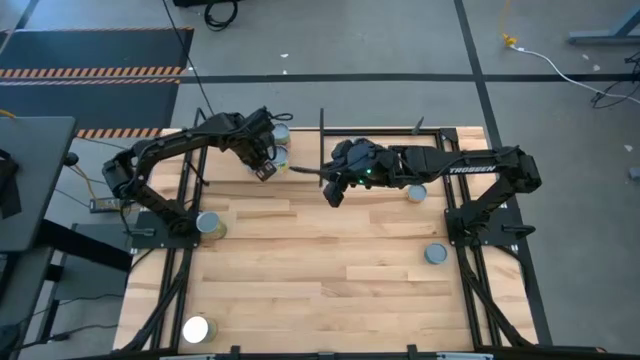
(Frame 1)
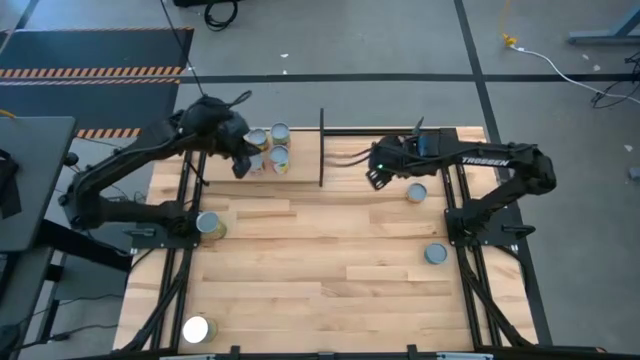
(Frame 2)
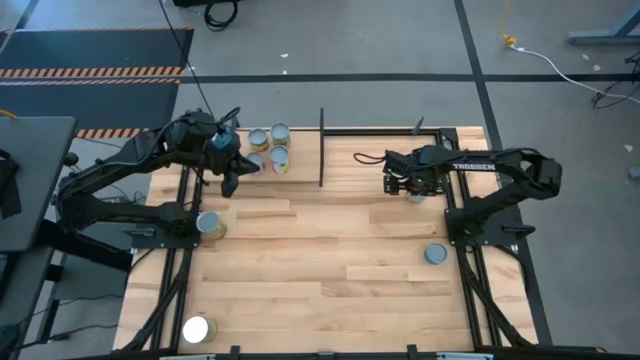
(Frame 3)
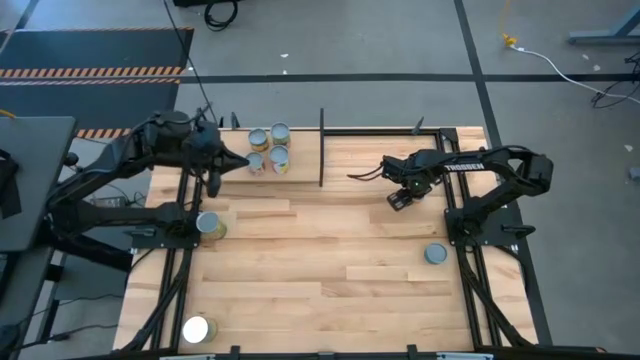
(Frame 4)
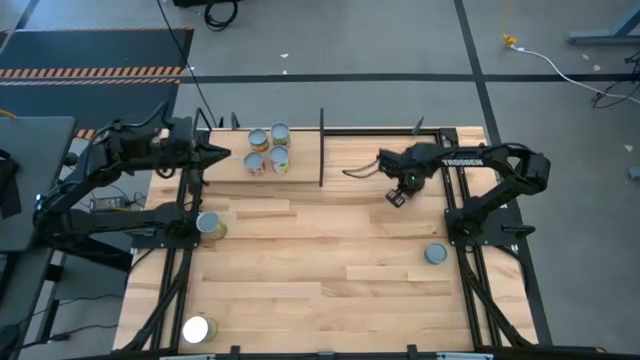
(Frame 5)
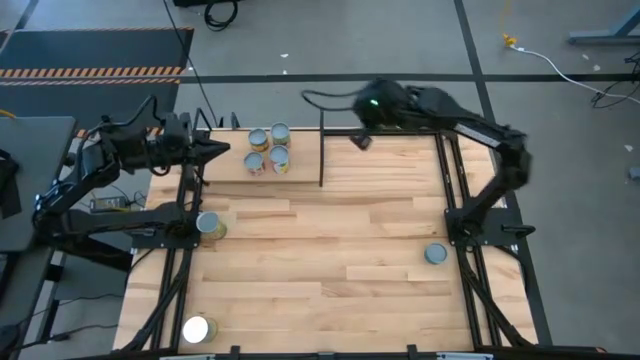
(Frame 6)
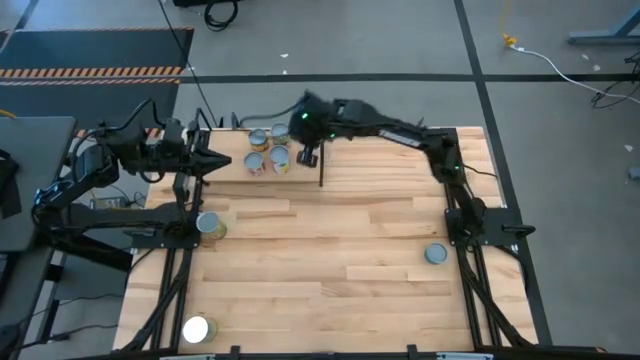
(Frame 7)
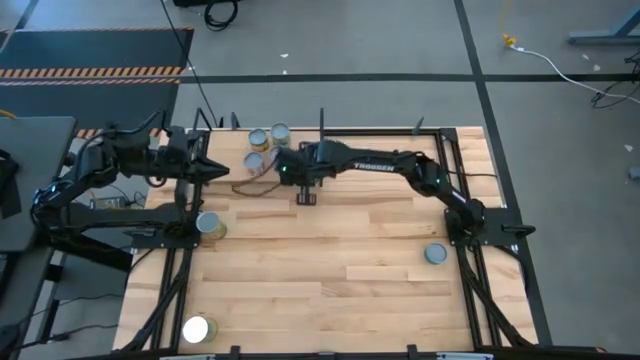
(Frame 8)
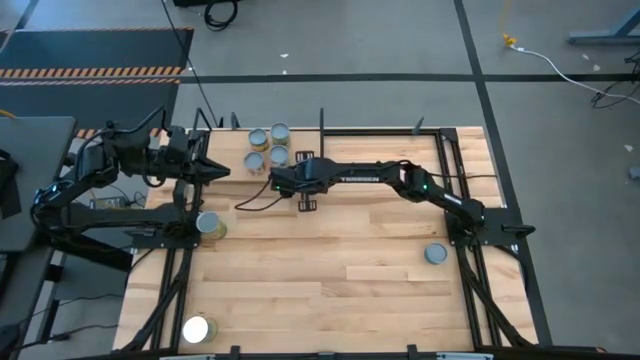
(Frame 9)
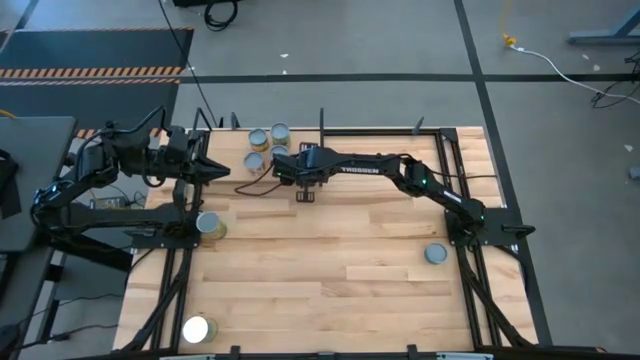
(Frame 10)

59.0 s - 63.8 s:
Task: Pick and place cans onto a shelf
Put the canned mushrooms on the shelf

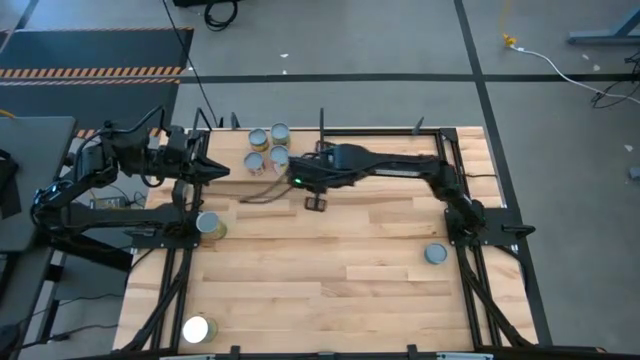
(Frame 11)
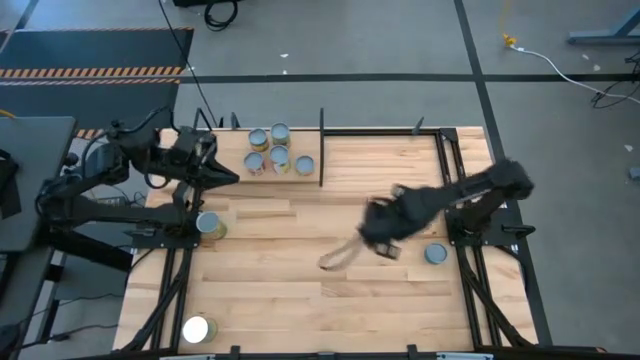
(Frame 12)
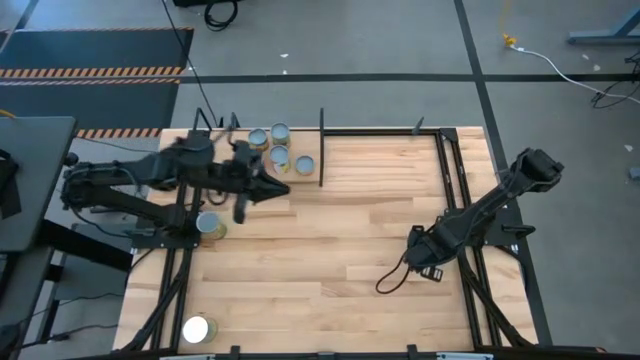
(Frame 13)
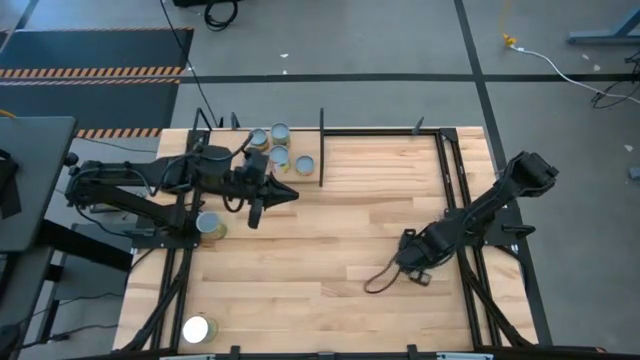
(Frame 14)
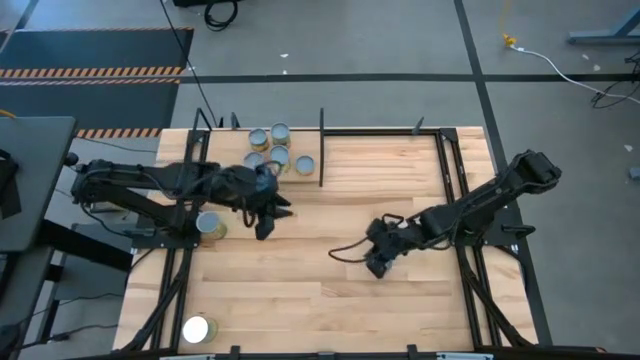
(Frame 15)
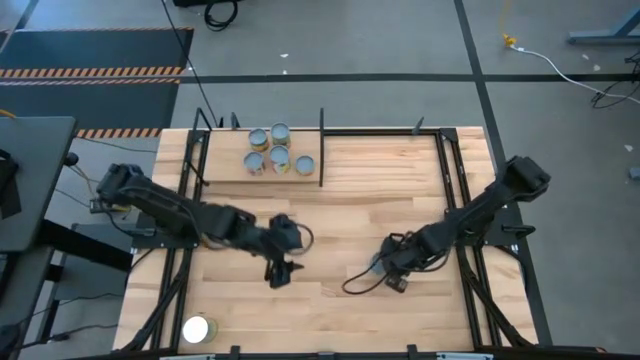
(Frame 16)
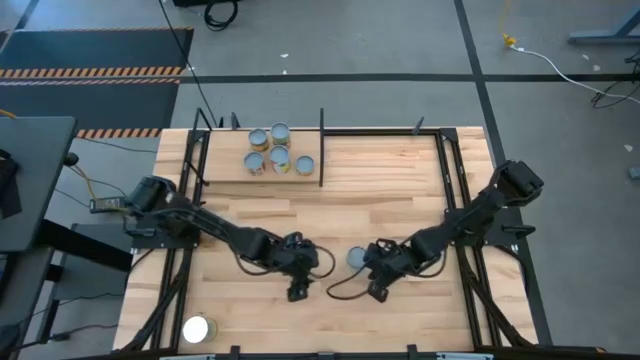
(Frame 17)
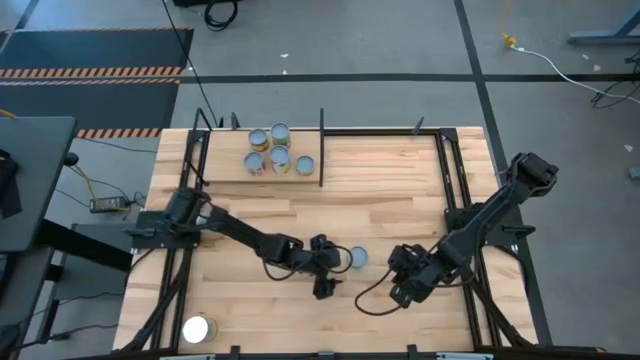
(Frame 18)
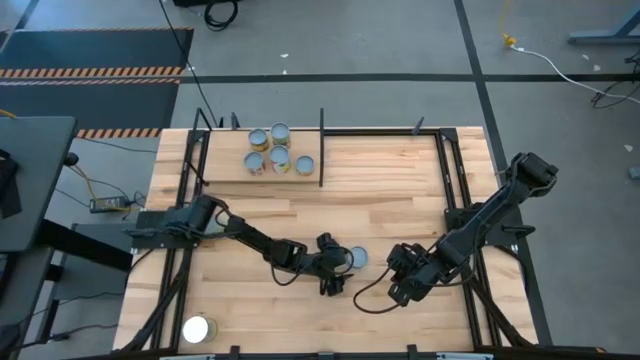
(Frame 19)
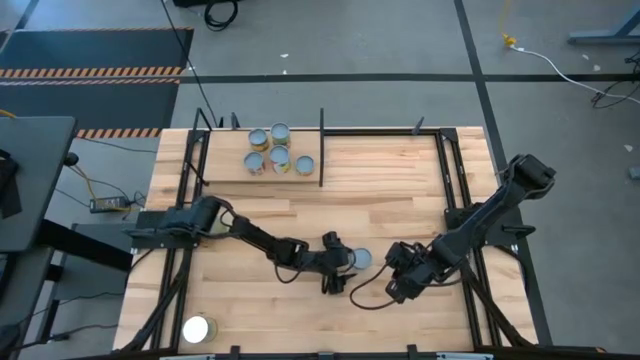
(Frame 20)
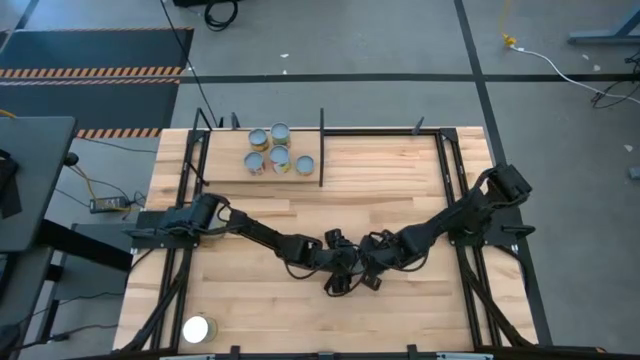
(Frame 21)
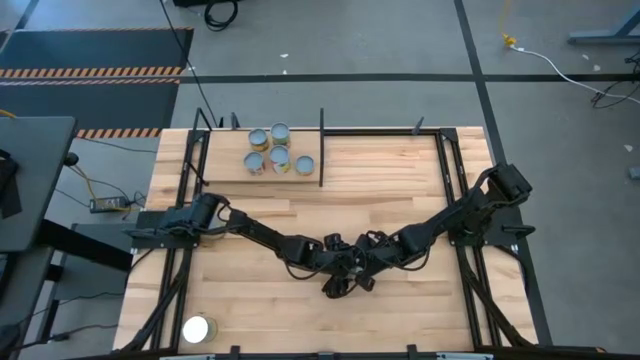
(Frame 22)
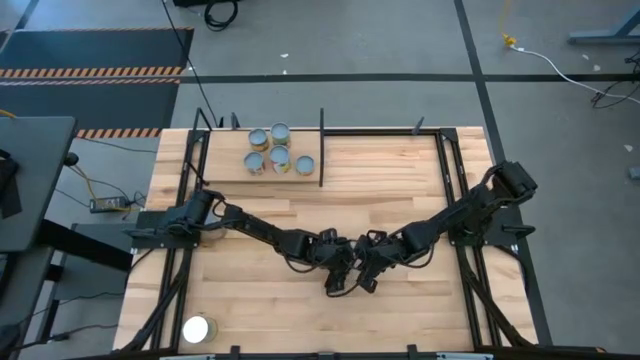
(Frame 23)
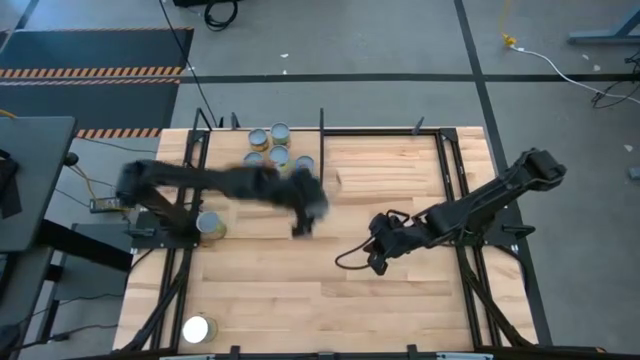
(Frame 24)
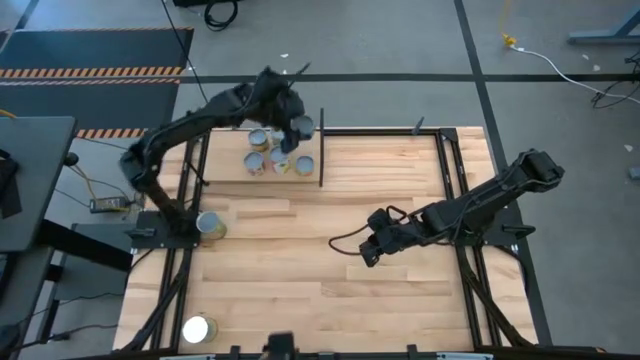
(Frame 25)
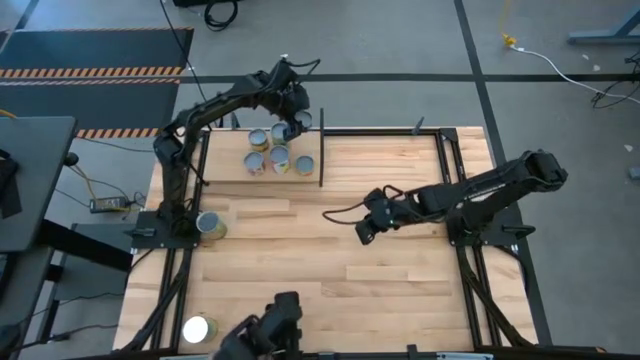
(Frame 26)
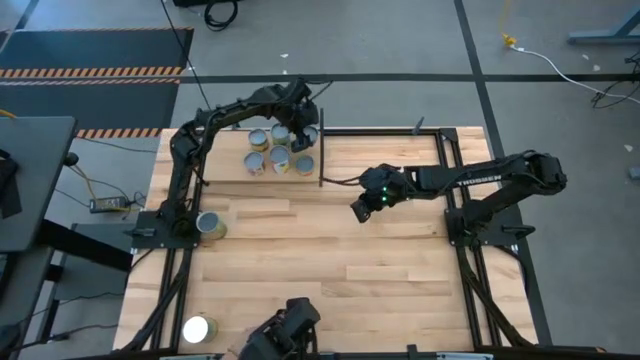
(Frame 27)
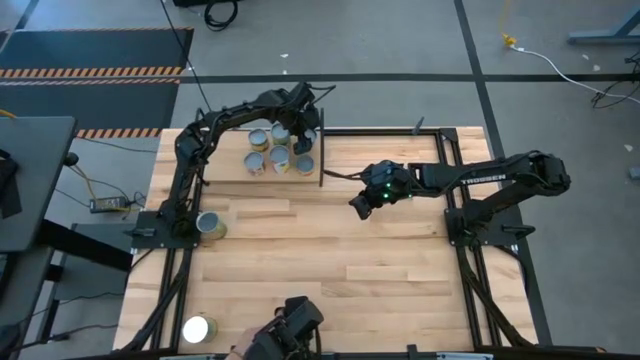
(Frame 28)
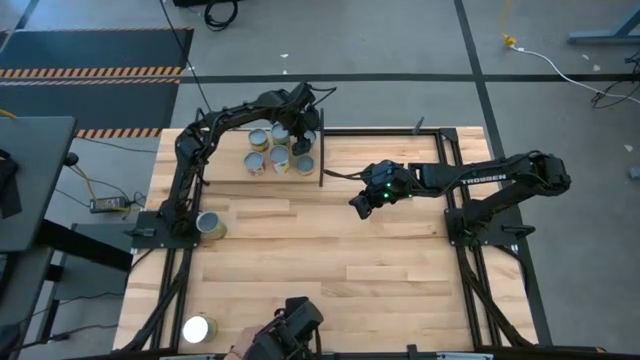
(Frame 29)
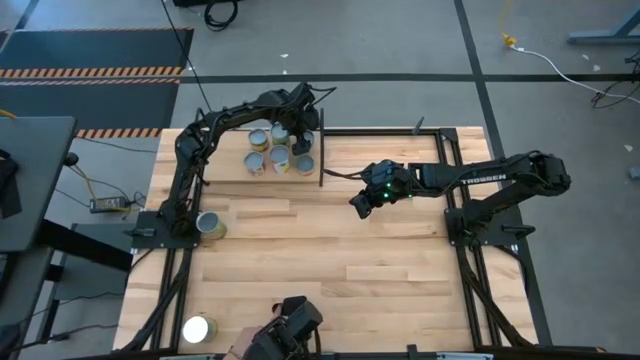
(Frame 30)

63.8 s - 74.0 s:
Put the canned tuna on the shelf aligned with the canned mushrooms

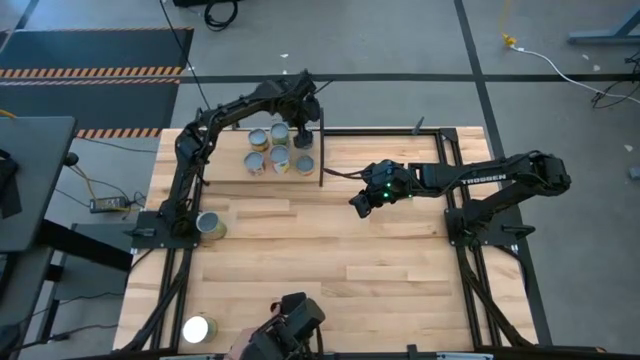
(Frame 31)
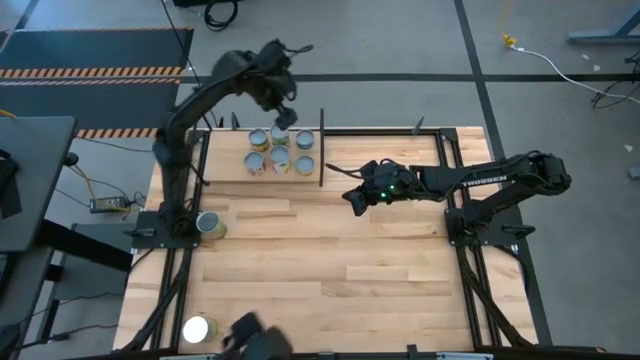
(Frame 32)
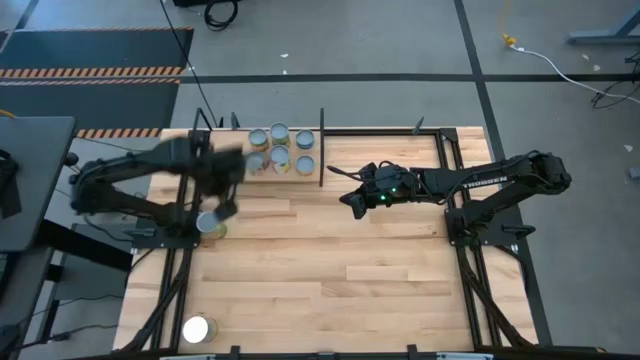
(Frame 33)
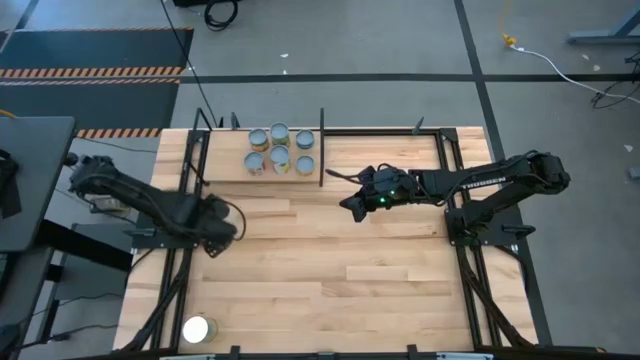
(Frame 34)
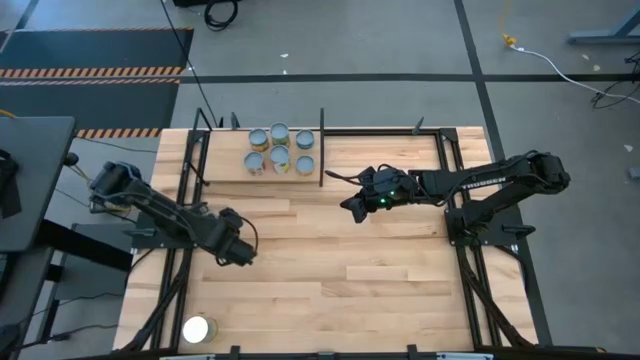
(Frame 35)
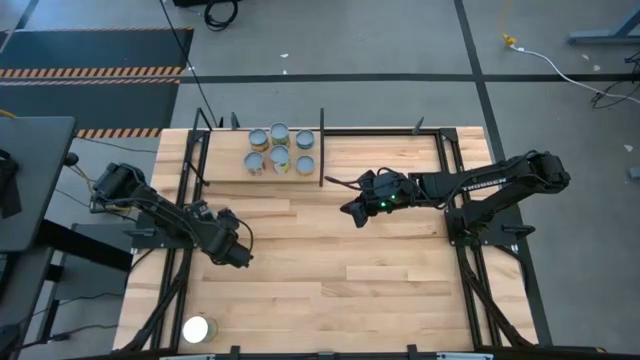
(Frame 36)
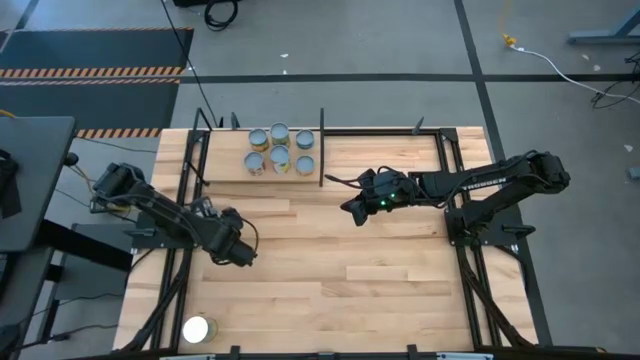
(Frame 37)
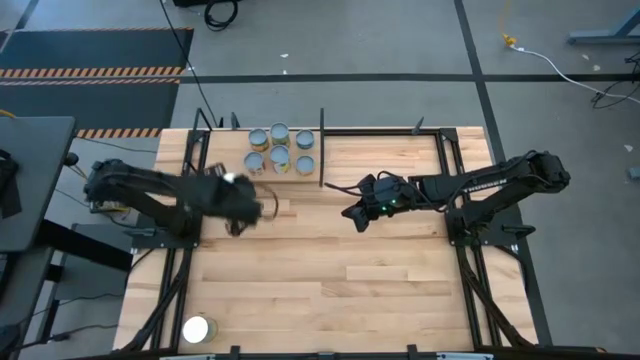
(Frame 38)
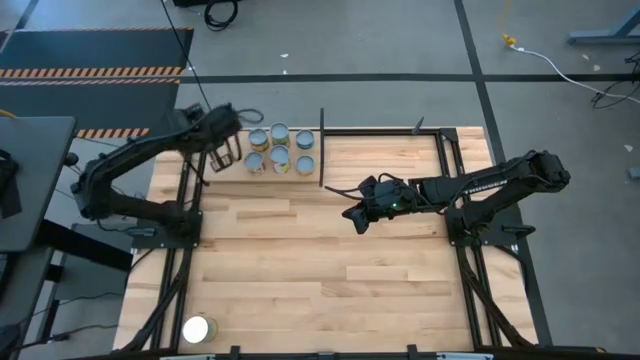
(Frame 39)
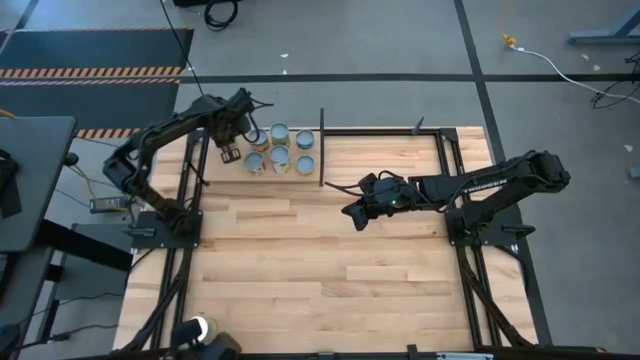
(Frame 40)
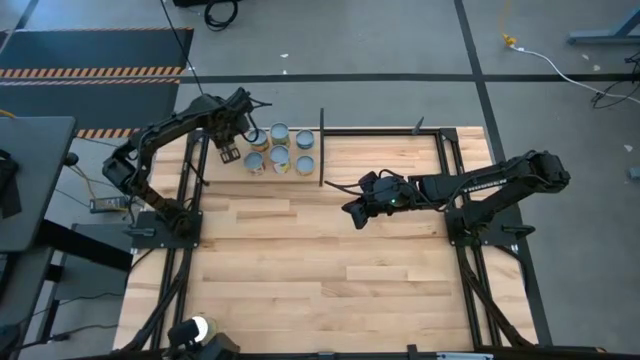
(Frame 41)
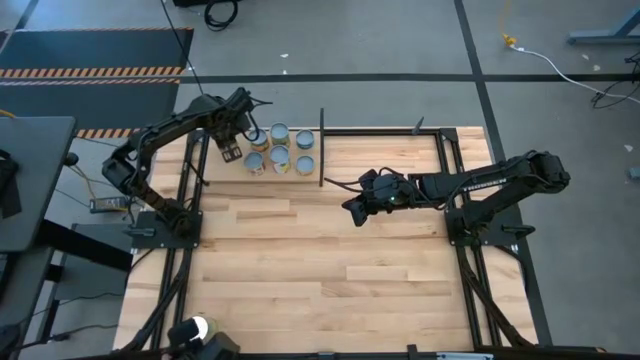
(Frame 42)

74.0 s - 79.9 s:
Put the canned oranges on the shelf
